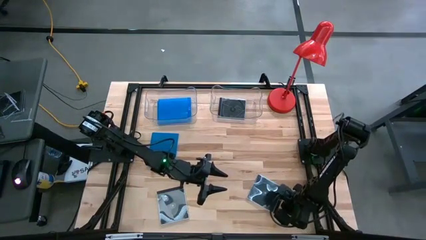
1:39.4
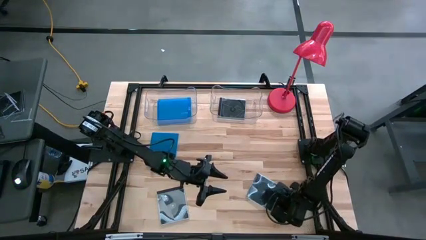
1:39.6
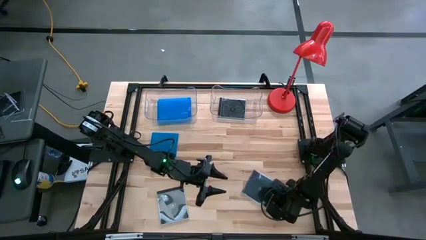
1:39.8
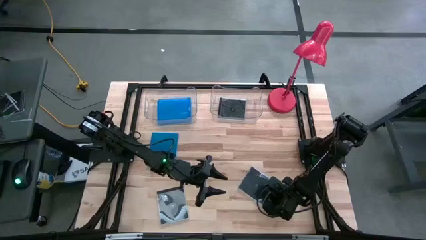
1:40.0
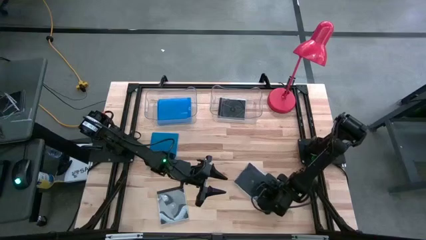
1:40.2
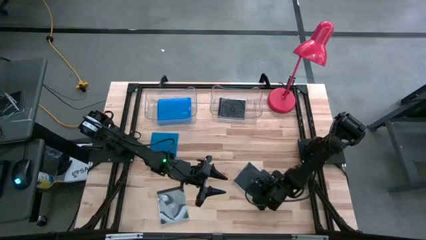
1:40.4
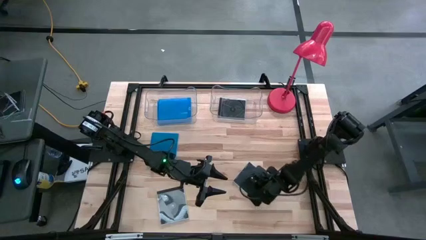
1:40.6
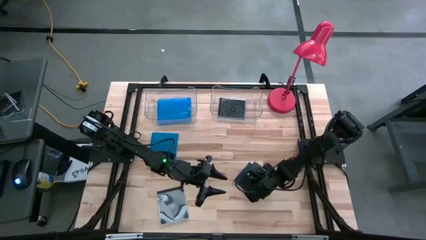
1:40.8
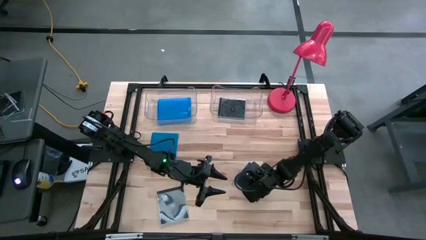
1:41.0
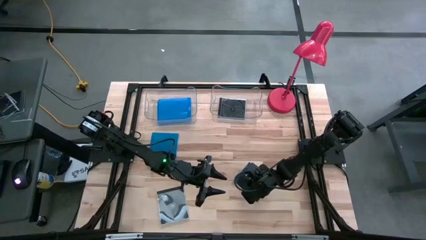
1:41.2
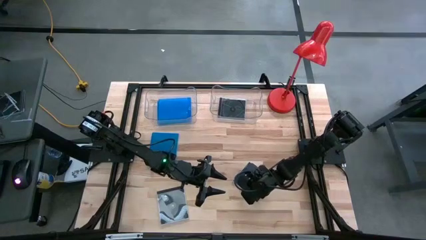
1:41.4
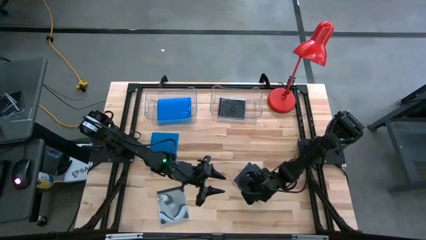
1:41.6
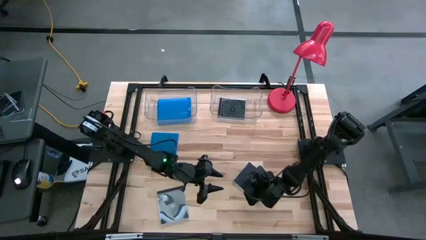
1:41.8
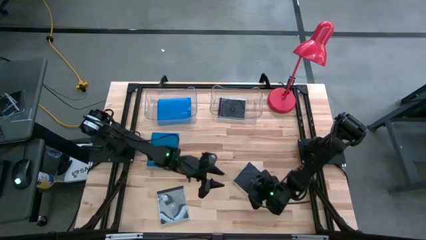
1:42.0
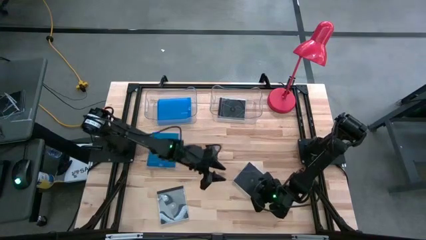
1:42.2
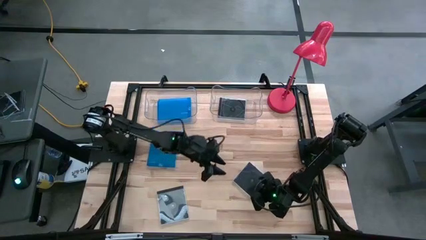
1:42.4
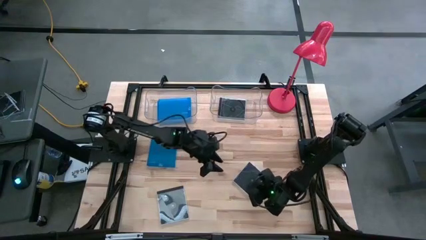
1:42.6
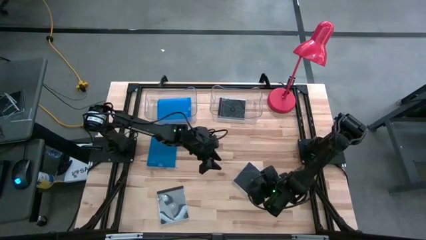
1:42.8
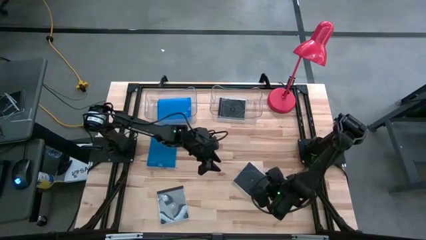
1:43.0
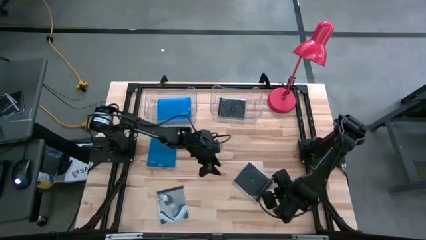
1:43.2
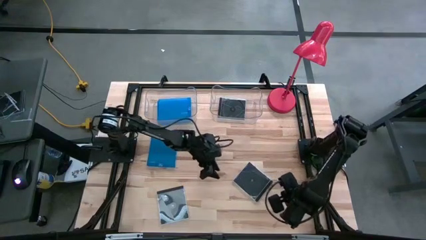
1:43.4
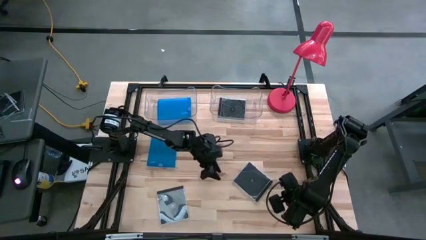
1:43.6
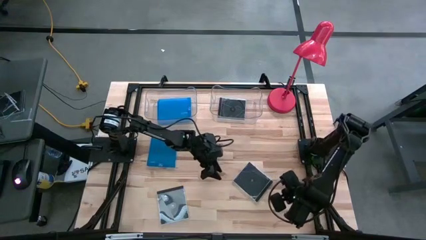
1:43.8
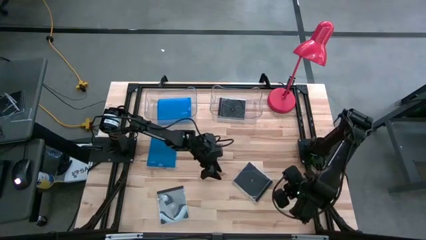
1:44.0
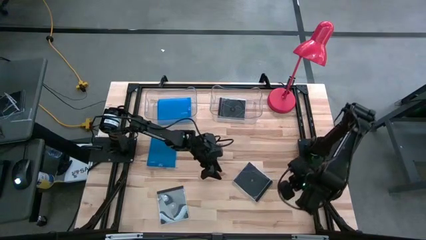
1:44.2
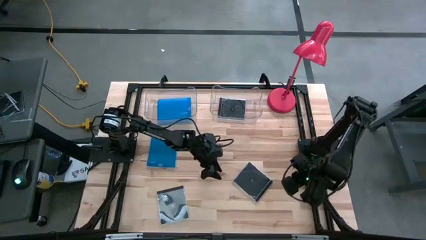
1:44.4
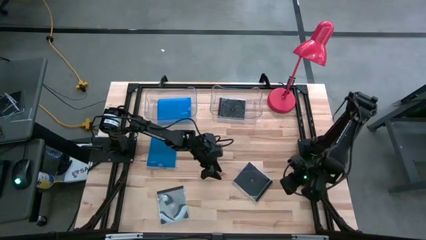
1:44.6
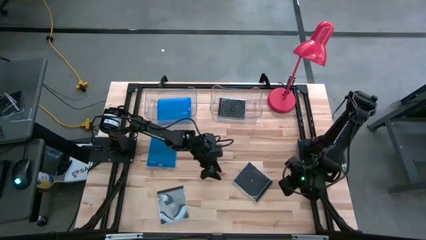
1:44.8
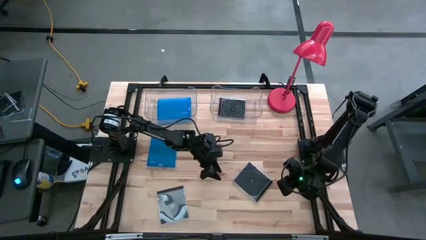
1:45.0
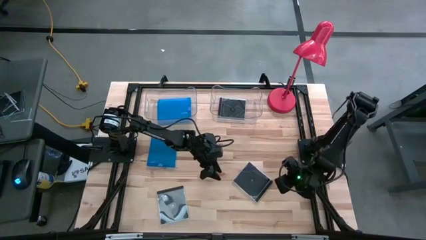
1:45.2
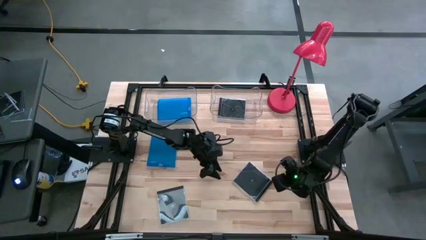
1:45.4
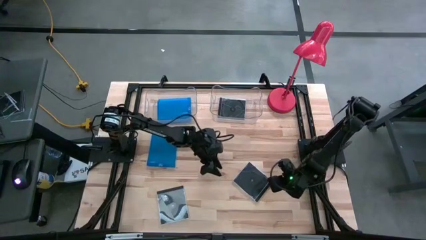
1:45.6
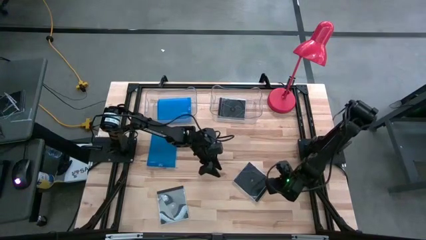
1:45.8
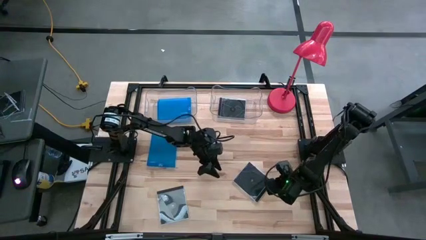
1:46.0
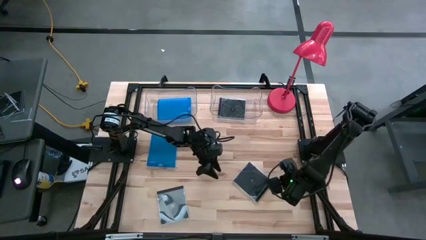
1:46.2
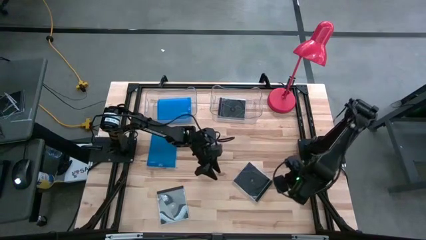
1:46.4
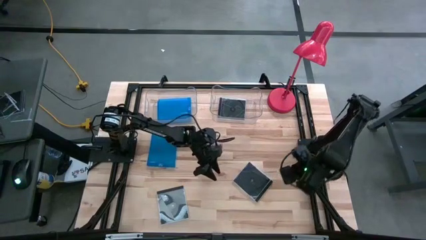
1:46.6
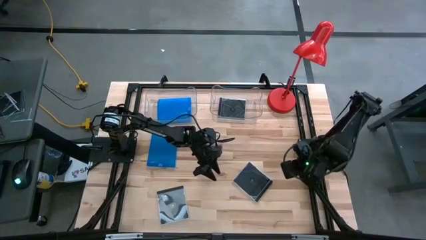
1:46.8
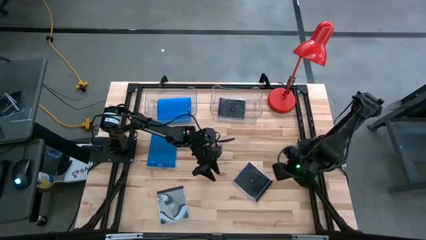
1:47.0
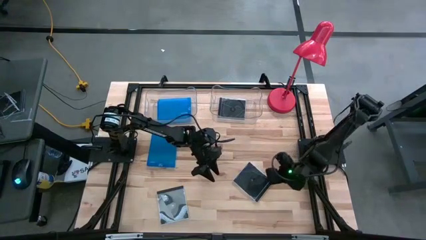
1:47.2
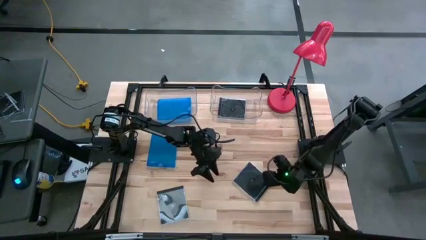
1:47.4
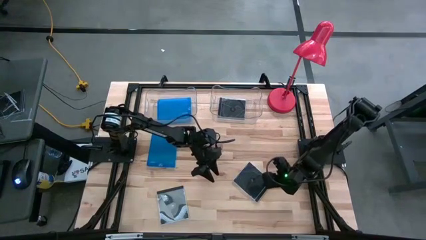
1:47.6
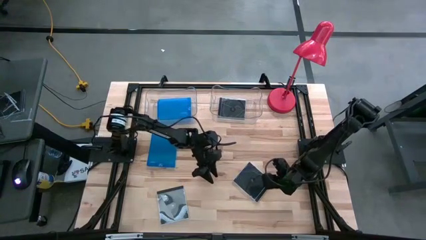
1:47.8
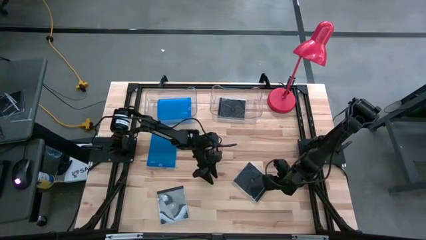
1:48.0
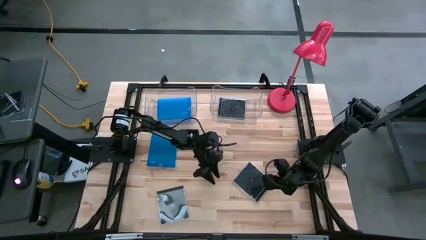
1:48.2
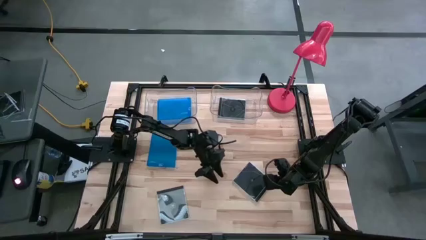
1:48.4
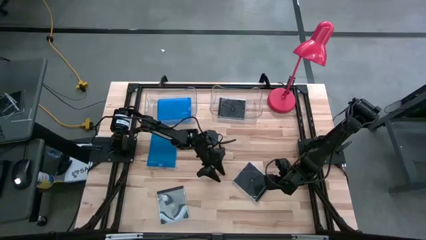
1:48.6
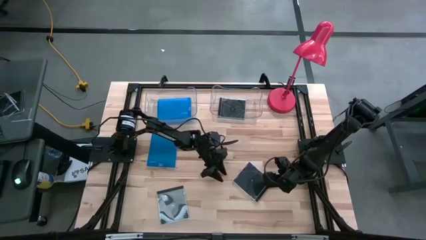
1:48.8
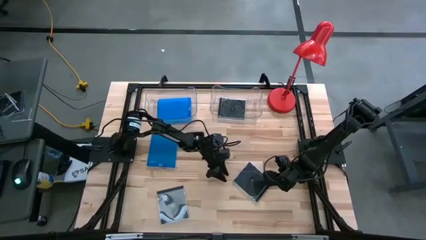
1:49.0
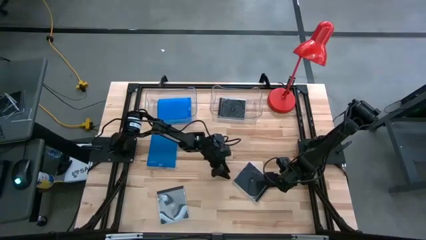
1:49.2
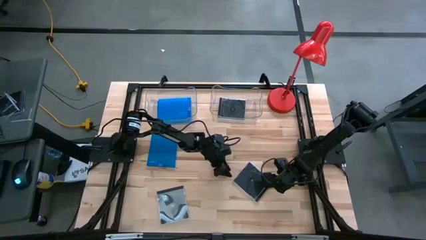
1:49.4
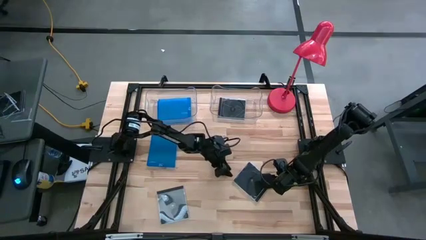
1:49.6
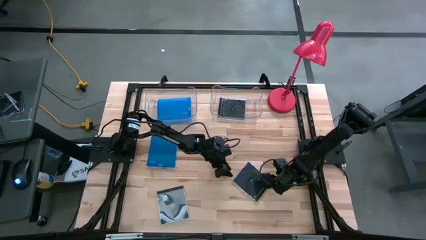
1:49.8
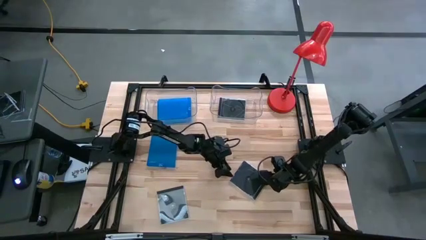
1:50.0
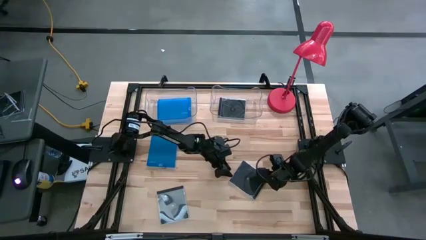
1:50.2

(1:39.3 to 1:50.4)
Task: Pick & place jewel cases by type
Put the right black CD case into the right transparent bin

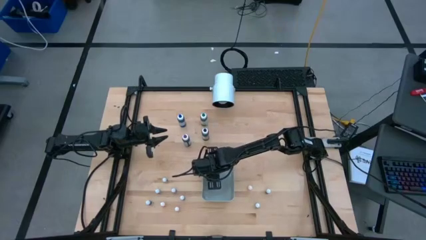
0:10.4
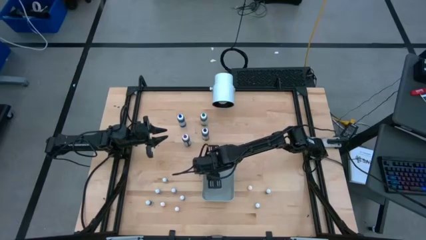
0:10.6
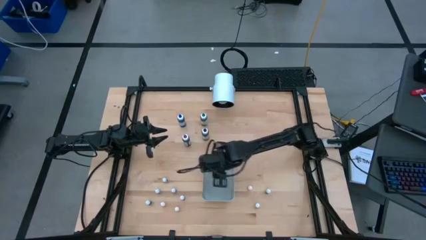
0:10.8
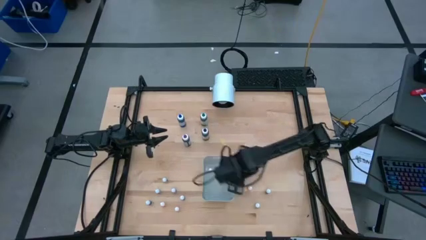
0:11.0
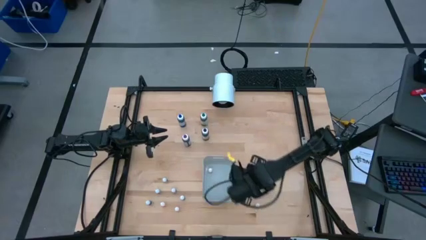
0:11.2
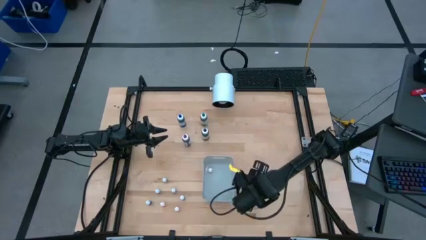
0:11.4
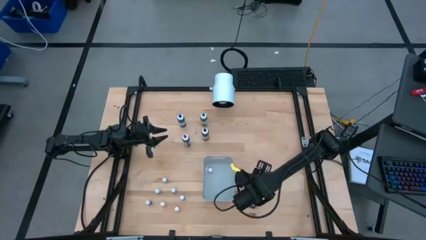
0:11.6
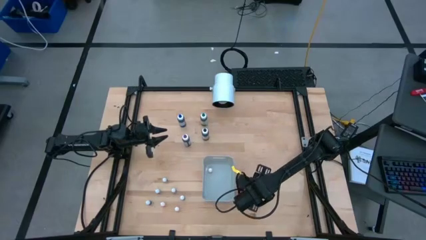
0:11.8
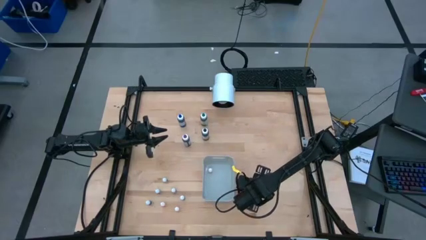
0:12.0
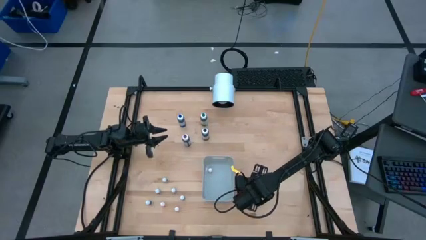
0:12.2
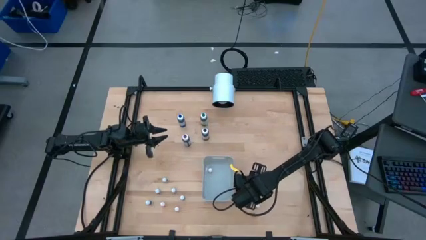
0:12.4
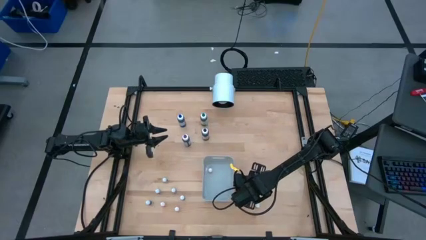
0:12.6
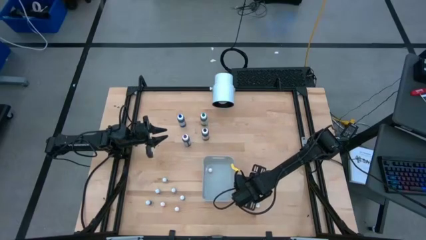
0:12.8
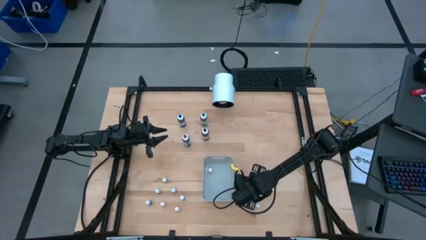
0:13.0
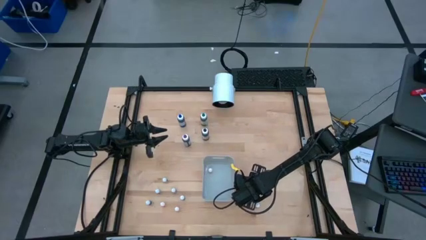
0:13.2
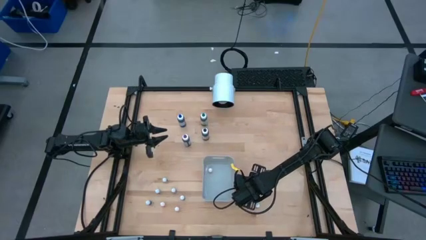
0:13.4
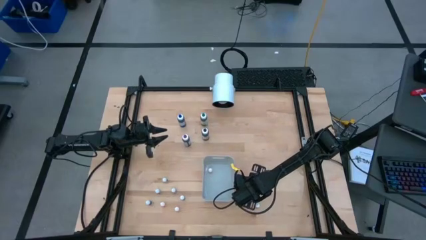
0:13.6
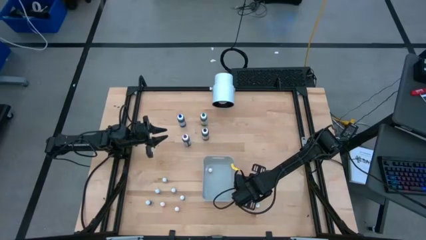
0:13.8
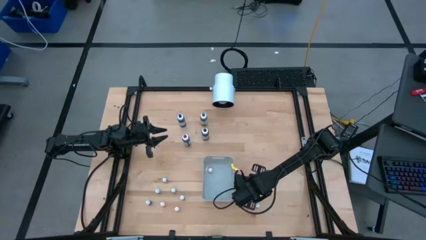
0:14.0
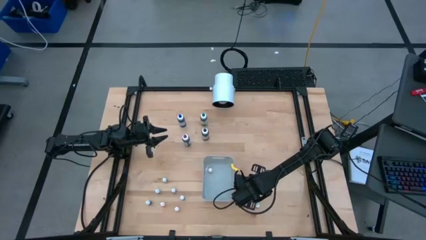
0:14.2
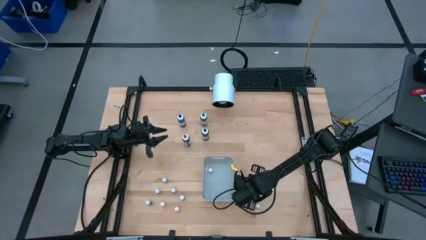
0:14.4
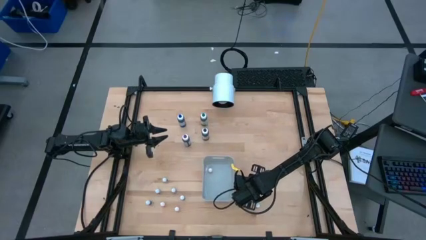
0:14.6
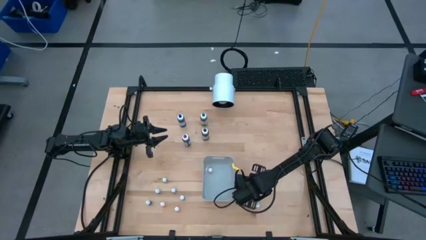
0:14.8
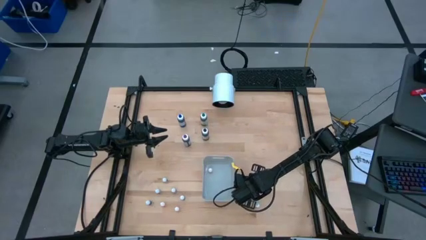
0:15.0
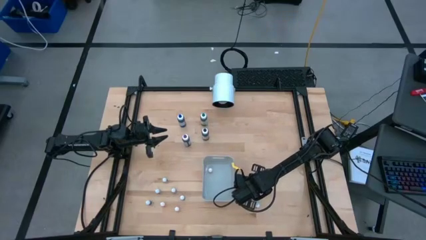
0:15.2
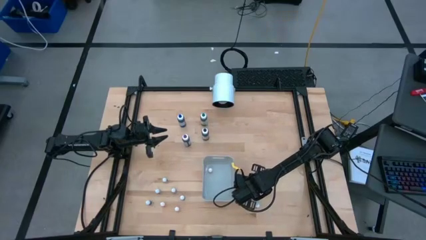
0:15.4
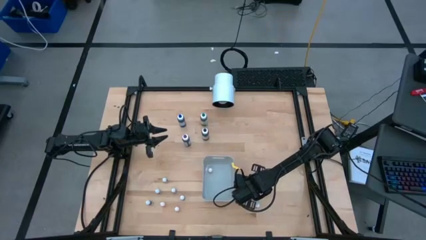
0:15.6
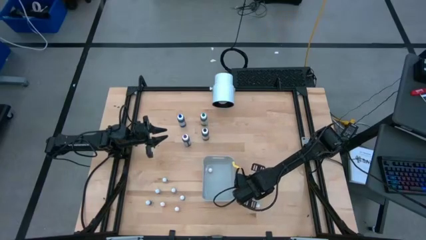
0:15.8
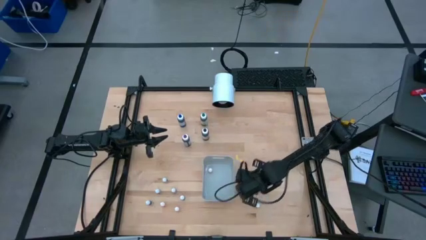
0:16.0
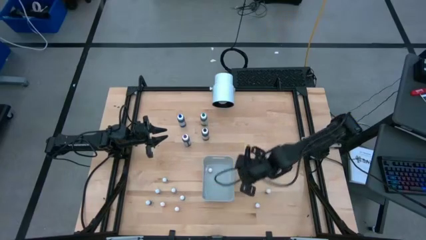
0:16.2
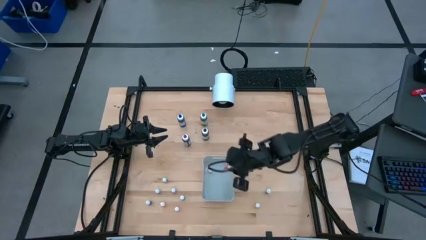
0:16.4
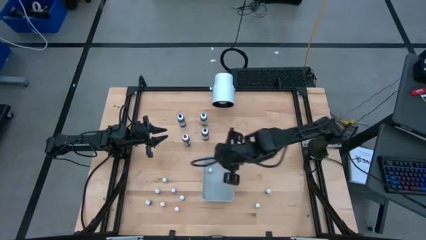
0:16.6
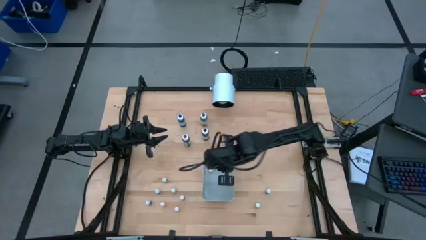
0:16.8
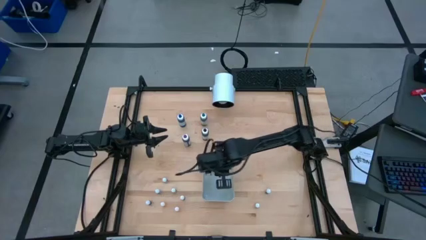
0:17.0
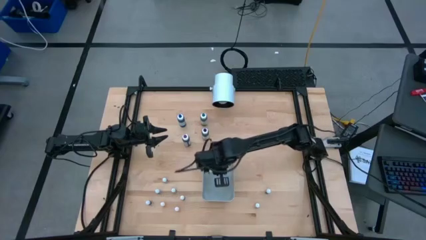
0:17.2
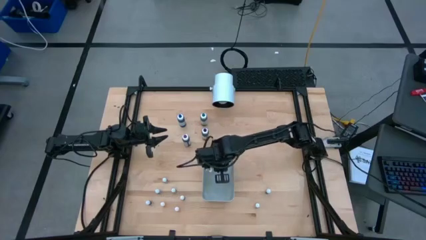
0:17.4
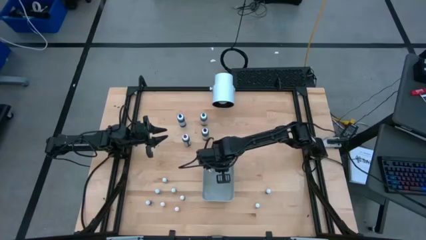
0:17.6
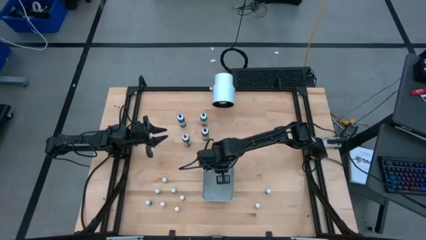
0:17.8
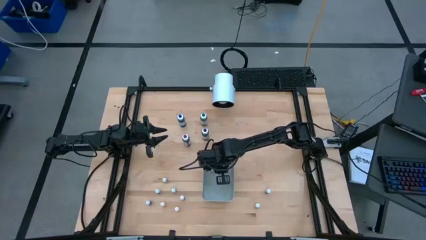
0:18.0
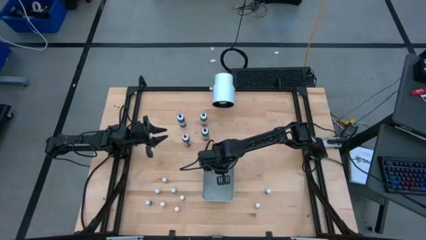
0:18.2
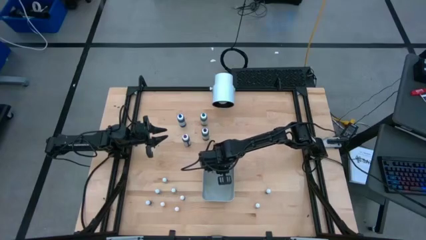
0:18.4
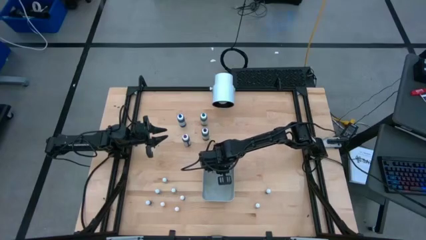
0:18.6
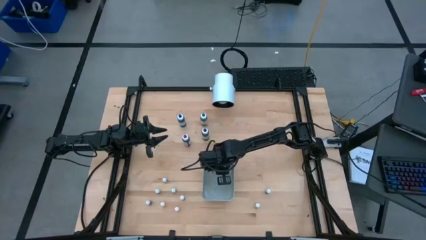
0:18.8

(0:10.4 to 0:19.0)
Task: Pick & Place food coloring
Put the small orange food coloring bottle into the gray bin
